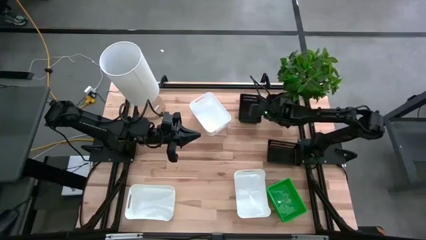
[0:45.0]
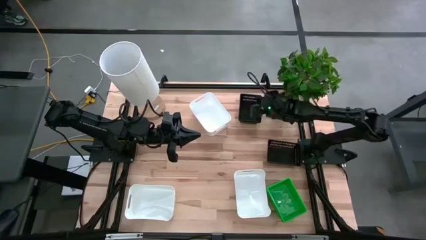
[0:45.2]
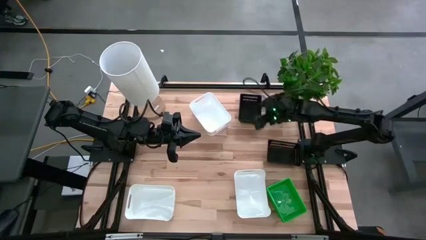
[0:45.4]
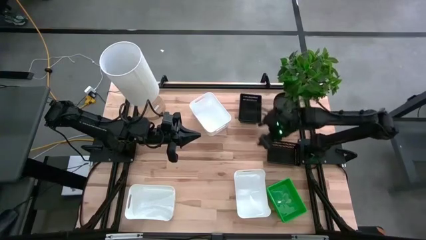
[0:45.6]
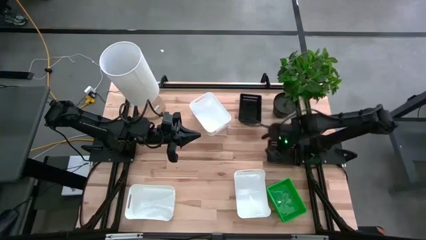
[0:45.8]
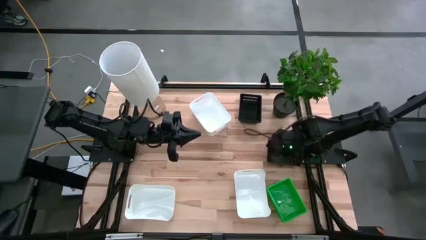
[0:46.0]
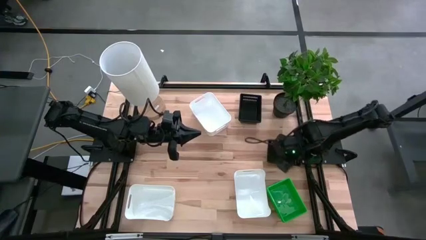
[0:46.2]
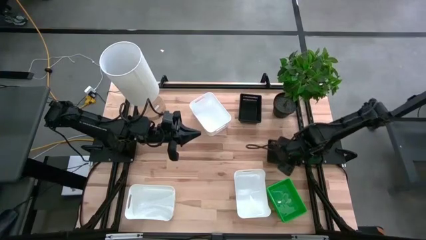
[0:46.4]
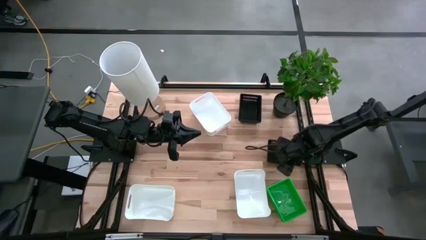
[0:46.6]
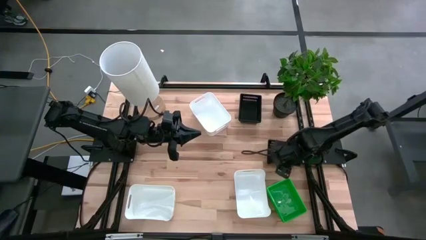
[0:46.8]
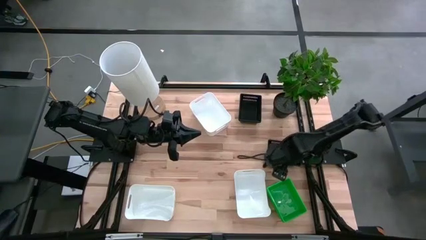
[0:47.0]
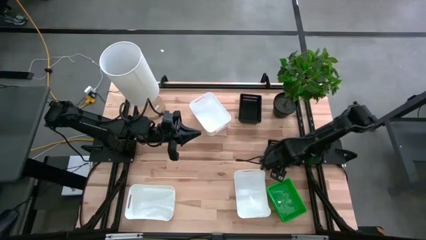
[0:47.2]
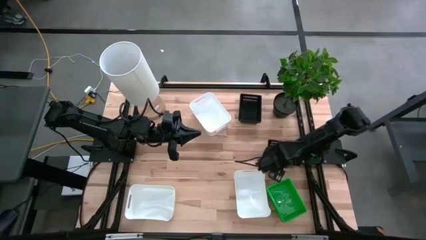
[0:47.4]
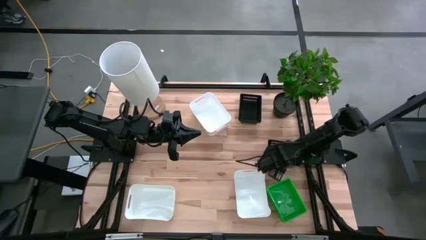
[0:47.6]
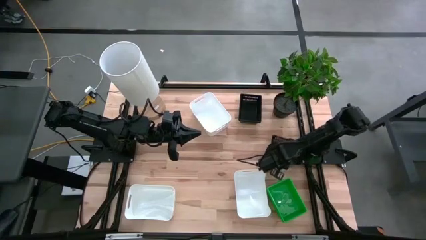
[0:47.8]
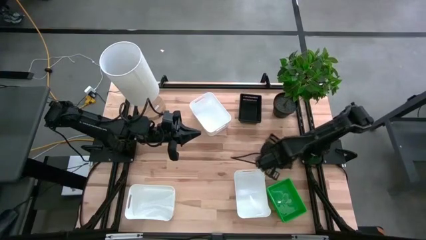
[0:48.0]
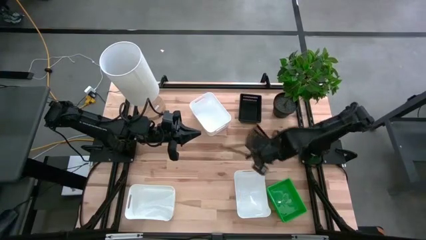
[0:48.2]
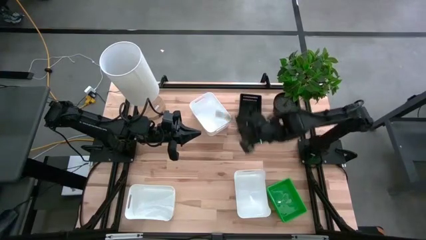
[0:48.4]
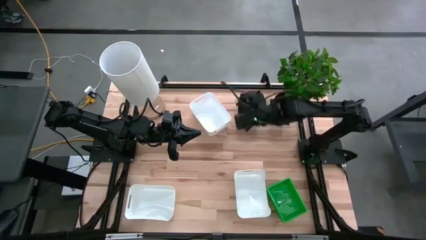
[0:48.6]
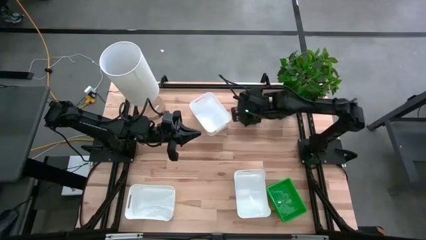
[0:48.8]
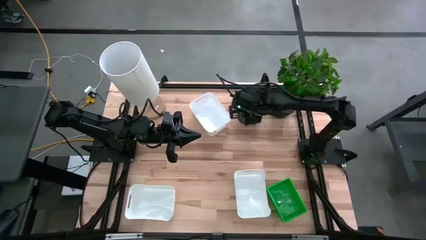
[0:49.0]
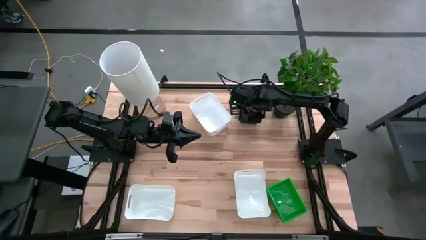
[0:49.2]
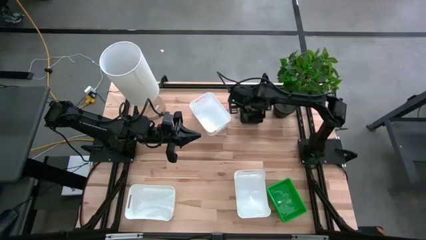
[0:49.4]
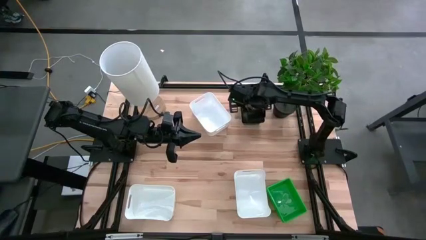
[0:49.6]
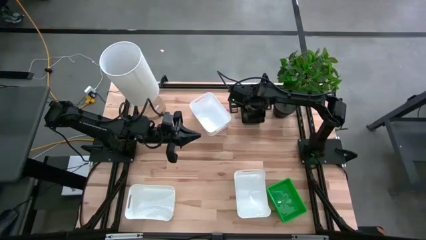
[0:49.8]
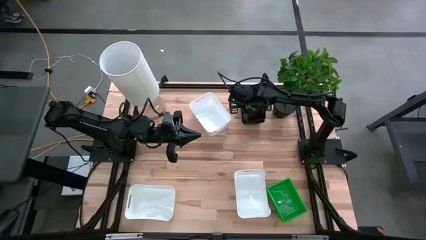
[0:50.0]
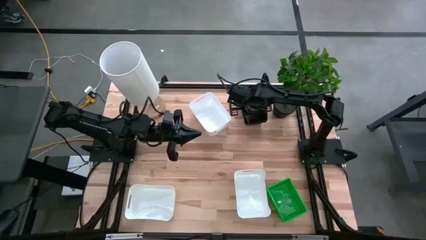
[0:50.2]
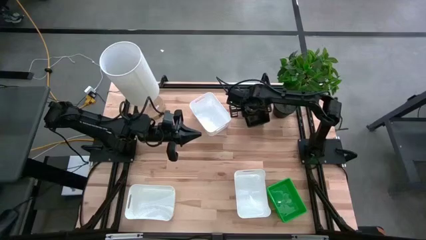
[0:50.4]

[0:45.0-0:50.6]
Stack the bottom black bin on top of the top black bins

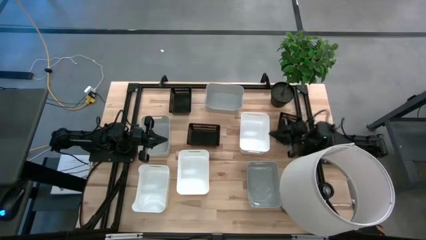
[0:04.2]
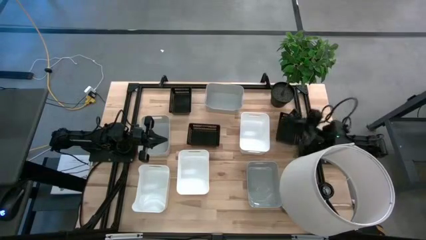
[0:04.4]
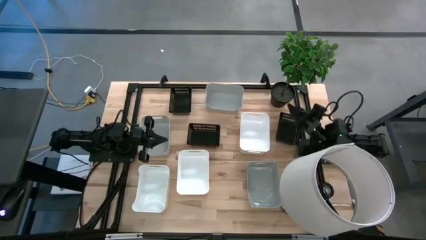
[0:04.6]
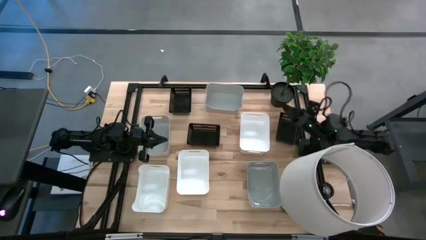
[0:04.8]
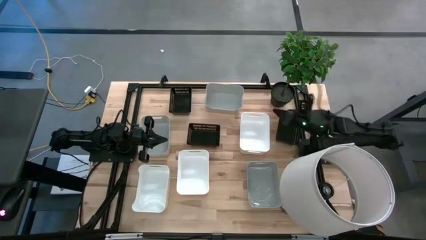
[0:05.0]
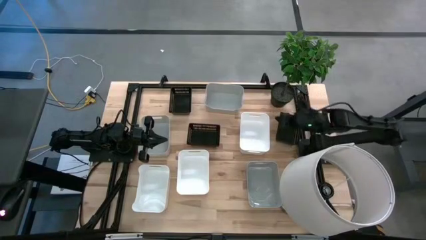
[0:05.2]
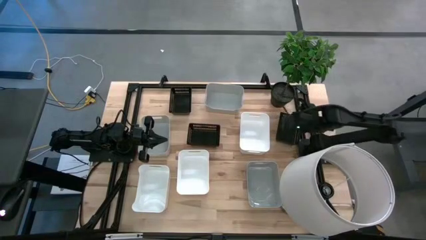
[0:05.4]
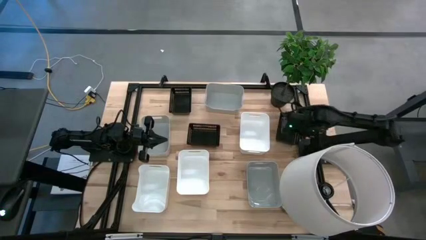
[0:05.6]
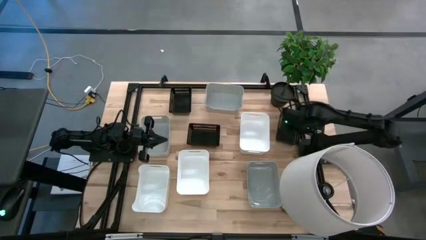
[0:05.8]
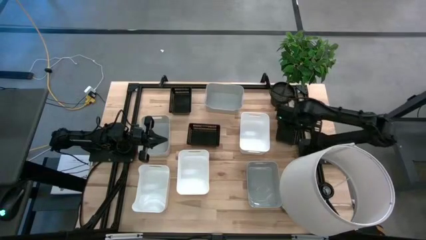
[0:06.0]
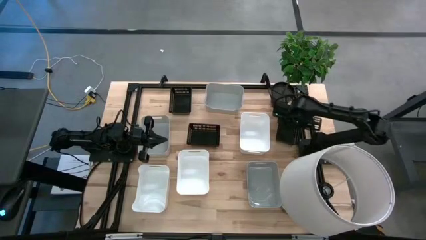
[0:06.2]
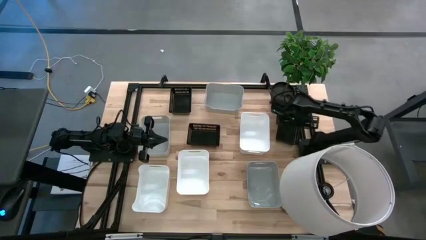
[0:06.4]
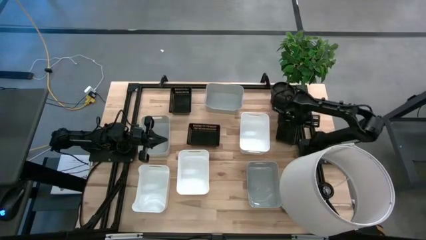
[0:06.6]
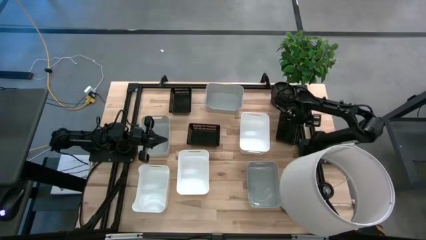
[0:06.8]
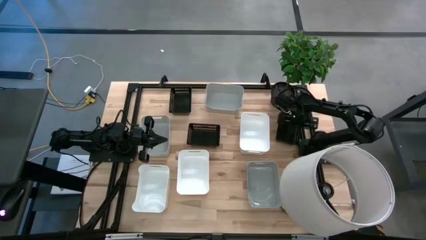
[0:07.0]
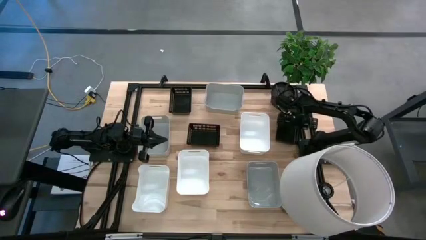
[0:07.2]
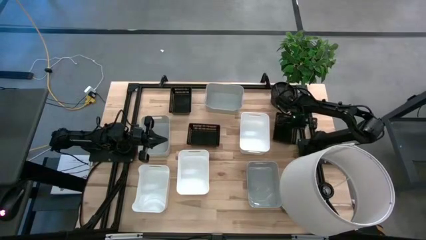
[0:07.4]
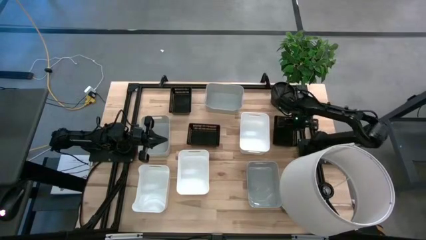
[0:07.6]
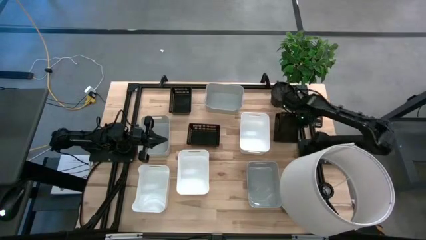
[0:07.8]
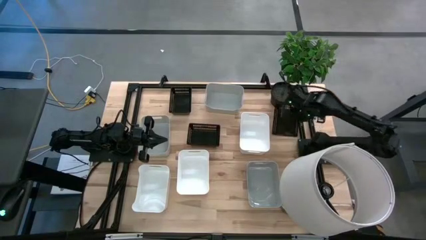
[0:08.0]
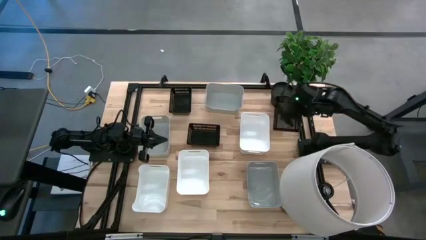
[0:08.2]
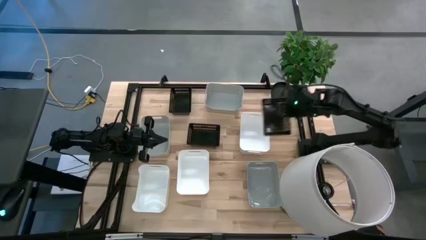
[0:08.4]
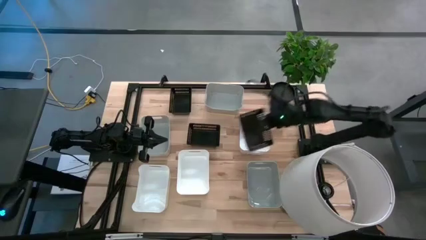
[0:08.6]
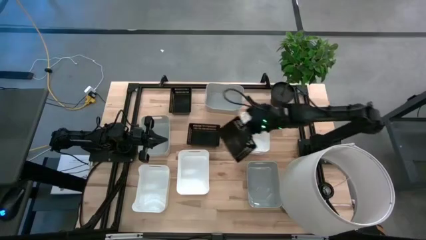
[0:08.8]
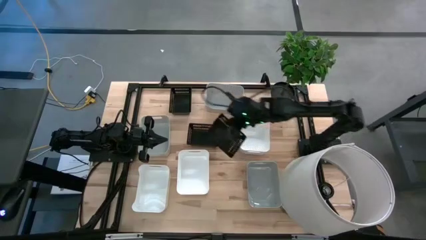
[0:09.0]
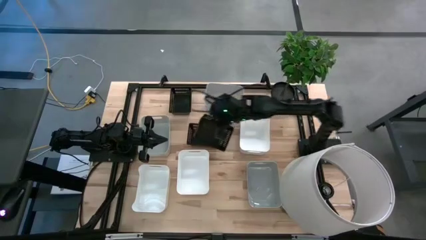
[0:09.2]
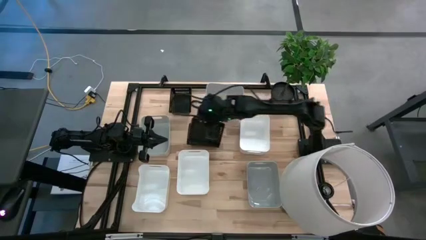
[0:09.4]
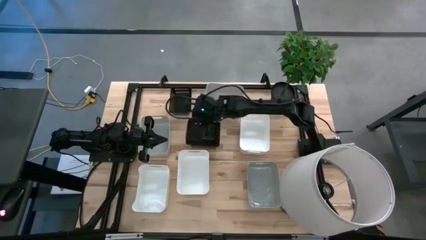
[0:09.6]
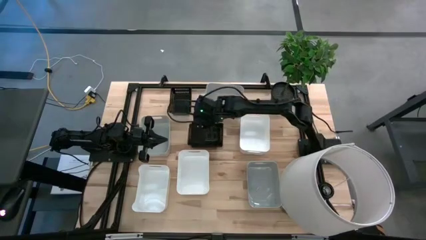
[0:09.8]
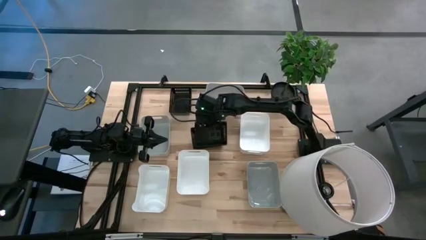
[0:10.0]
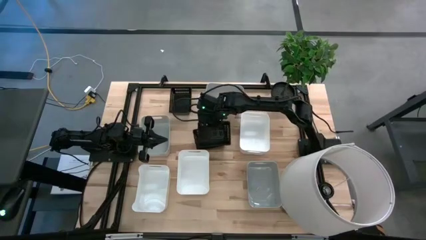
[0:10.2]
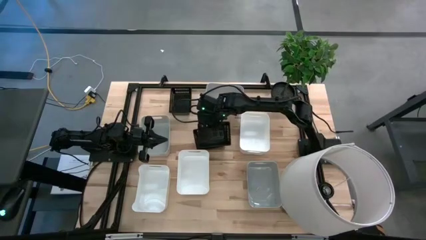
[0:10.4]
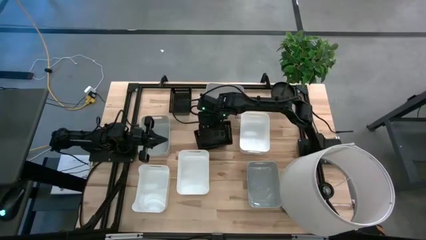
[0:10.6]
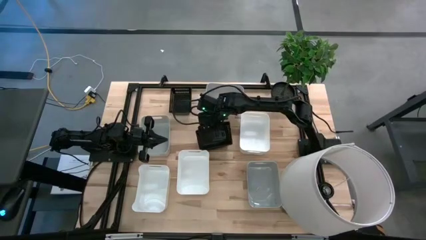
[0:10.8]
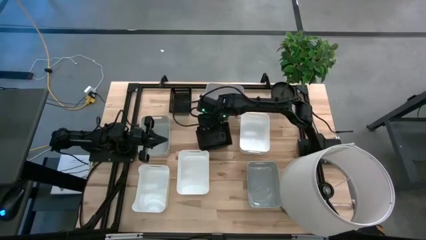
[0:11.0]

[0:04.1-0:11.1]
Stack the bottom right black bin on top of the bottom black bin
